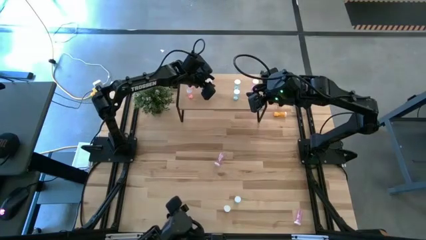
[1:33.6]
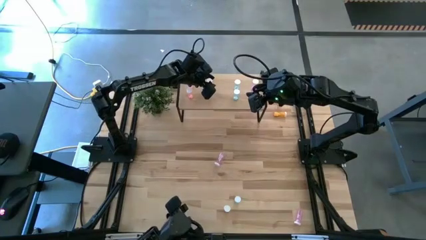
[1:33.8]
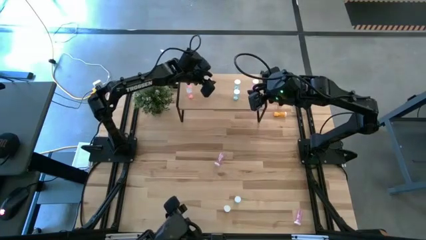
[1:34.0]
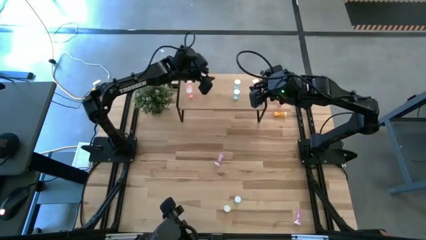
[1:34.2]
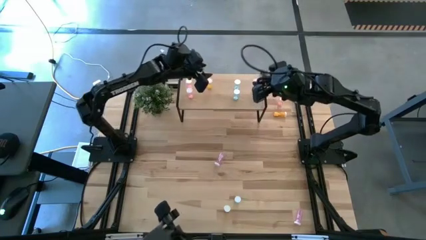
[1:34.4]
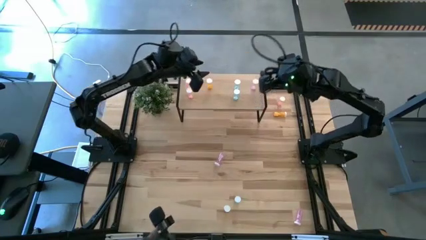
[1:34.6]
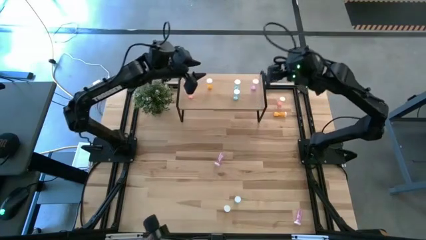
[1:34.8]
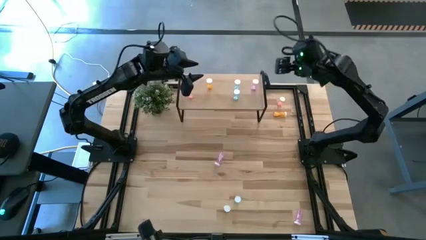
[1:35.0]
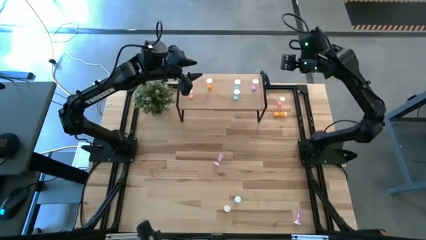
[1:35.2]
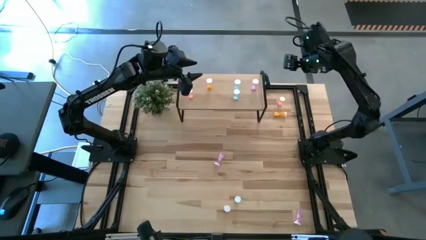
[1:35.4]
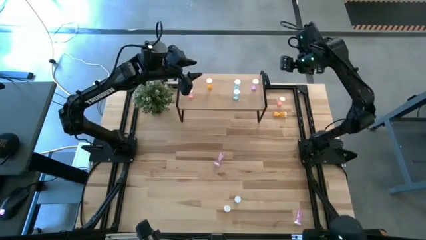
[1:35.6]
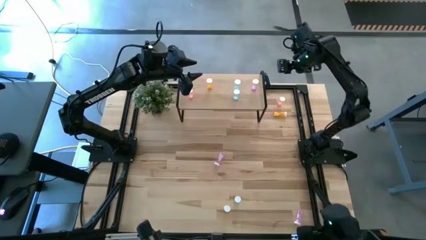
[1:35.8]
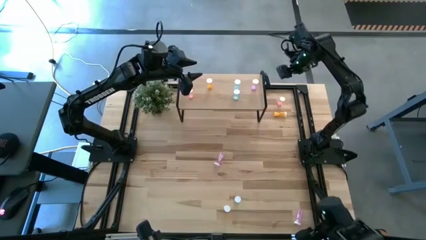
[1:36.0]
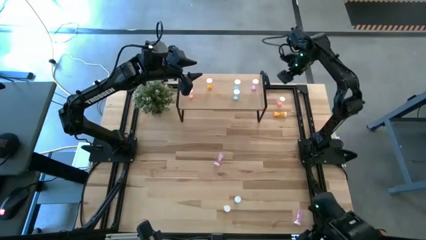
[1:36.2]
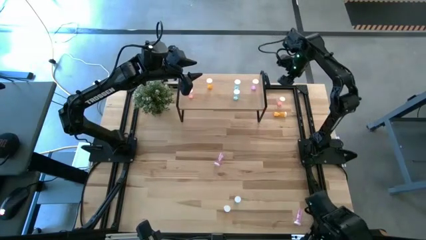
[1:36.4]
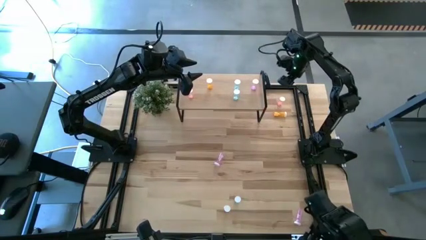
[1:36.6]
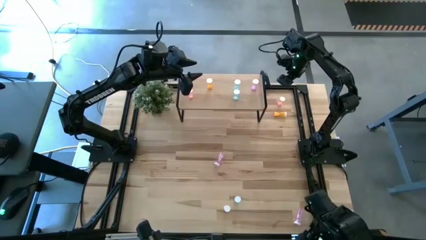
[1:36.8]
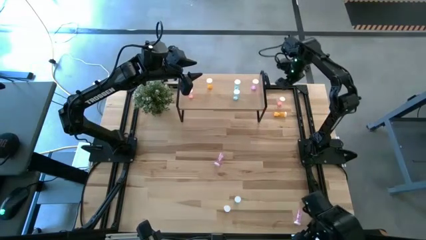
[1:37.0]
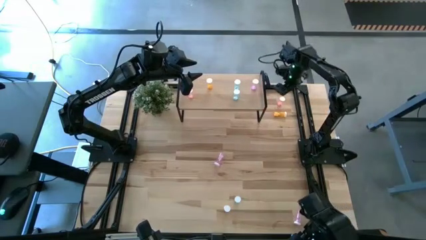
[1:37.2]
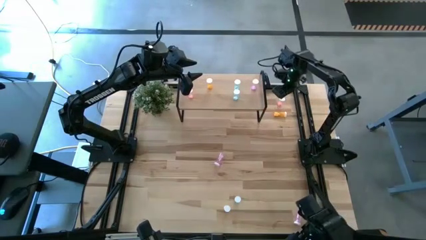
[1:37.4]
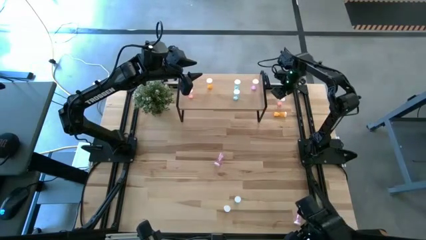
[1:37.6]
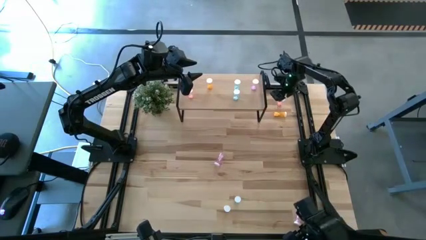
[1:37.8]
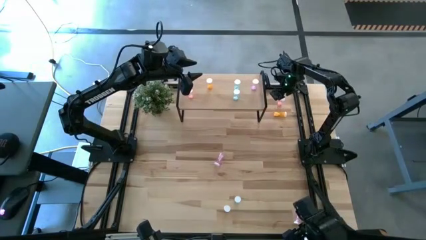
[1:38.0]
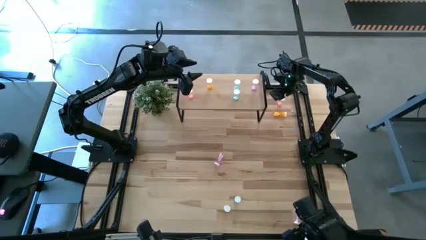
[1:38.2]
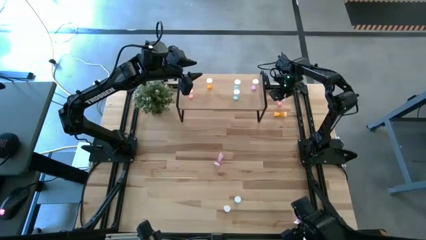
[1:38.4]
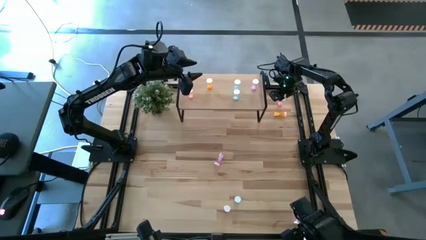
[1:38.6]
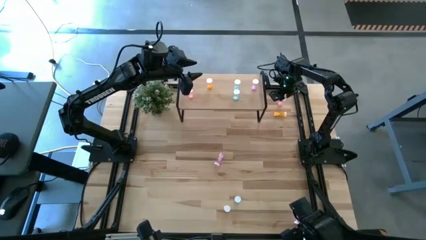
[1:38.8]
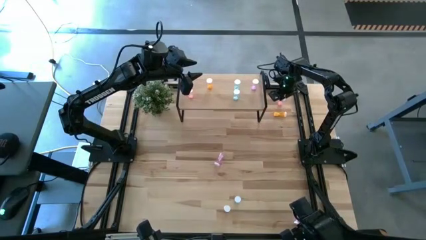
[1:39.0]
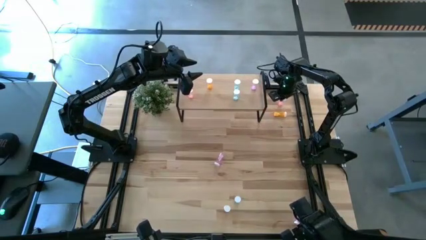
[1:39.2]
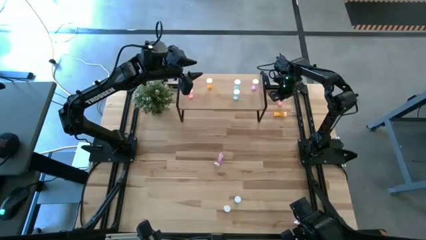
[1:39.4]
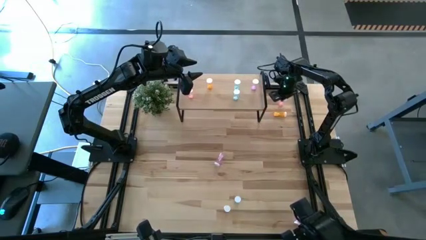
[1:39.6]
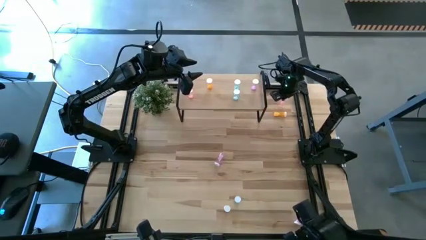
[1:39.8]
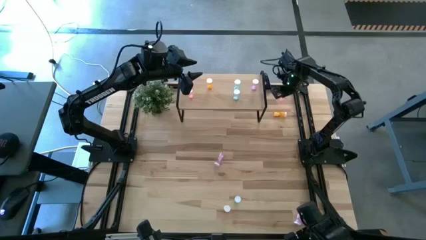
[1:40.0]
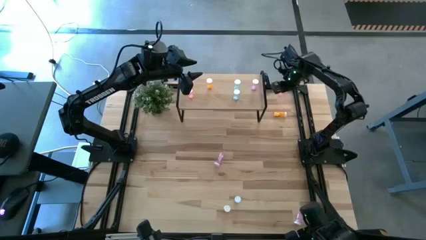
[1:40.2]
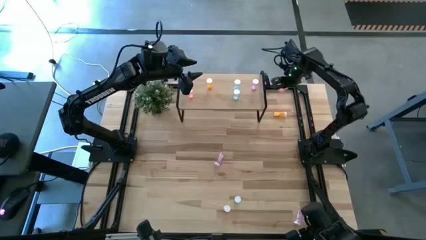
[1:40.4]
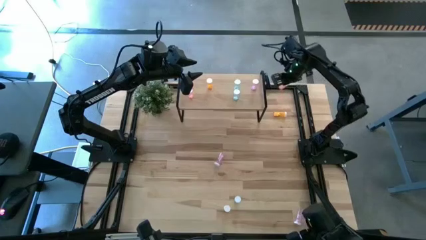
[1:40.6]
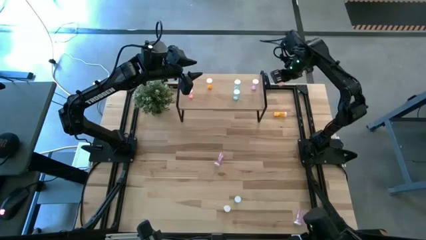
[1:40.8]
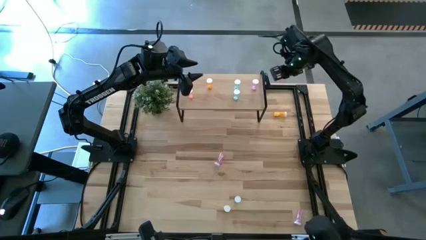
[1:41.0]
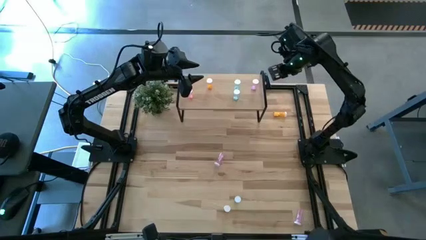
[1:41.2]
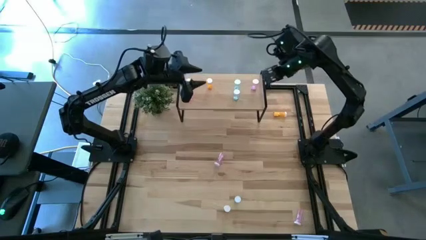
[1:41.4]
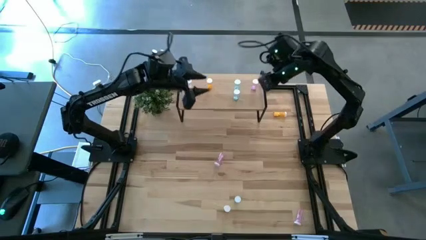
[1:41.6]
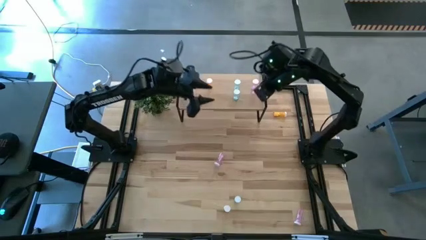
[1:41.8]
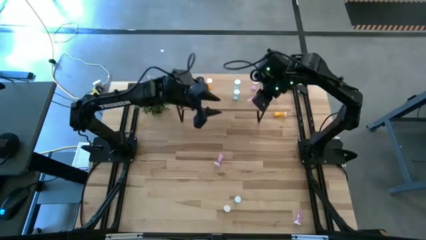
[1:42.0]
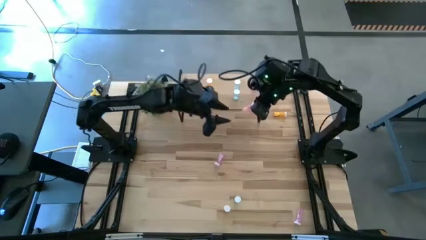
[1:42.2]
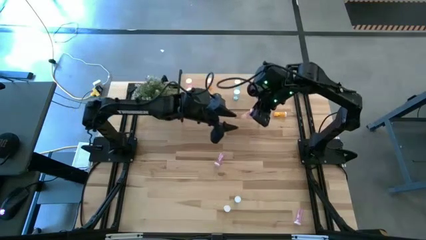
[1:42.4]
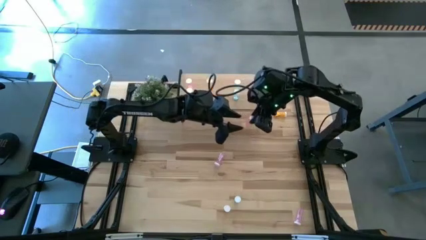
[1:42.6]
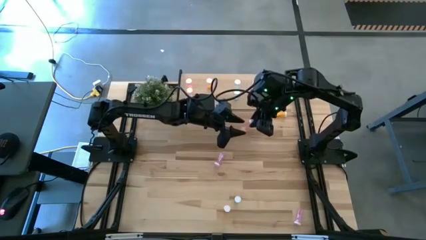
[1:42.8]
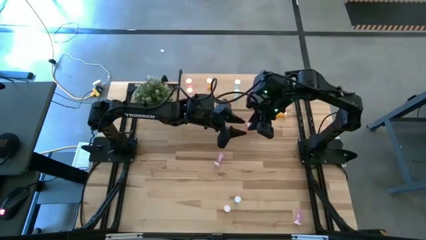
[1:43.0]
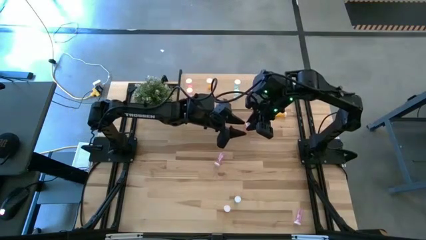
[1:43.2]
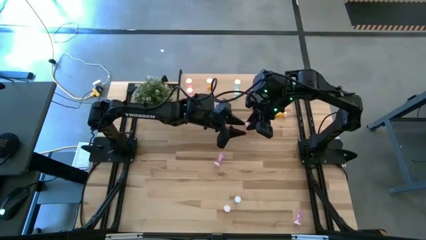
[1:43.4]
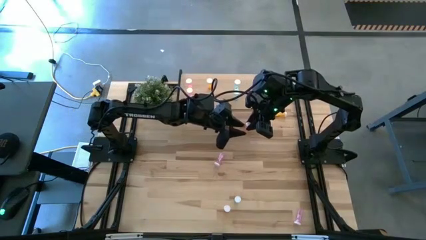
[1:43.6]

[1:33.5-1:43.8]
Task: Pick and place medicine bottles onto shelf by color
Put the pink pill bottle on the shelf aligned with the other pink pill bottles
